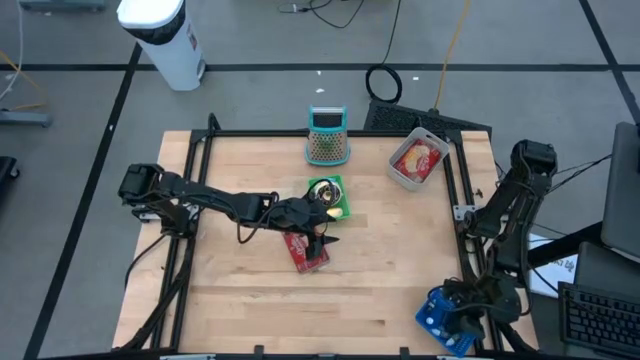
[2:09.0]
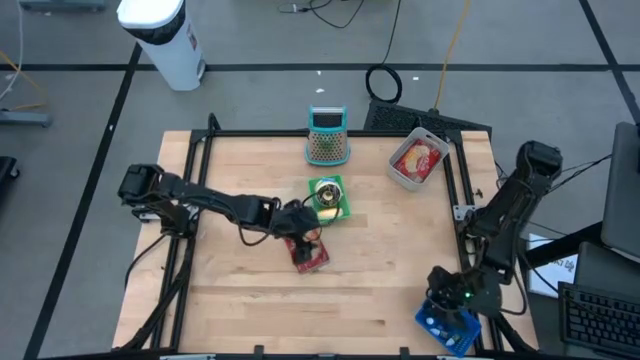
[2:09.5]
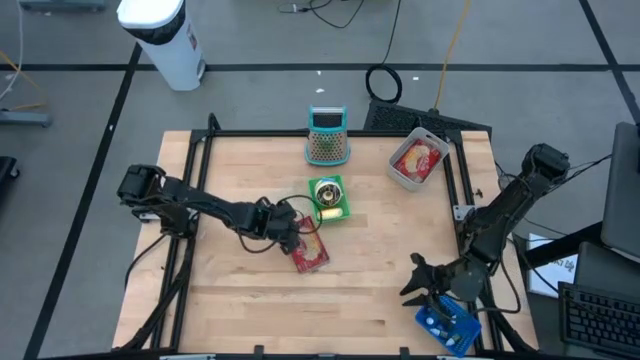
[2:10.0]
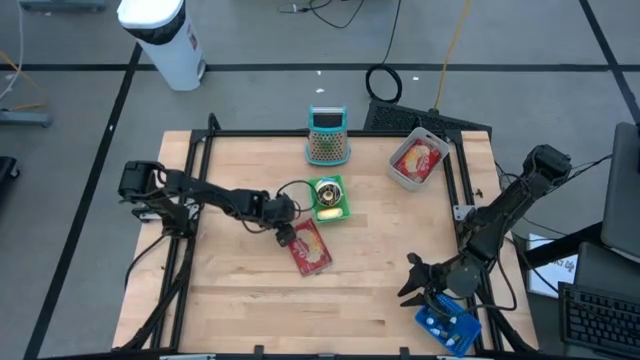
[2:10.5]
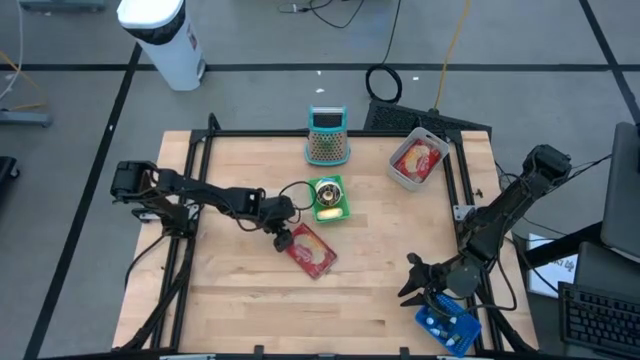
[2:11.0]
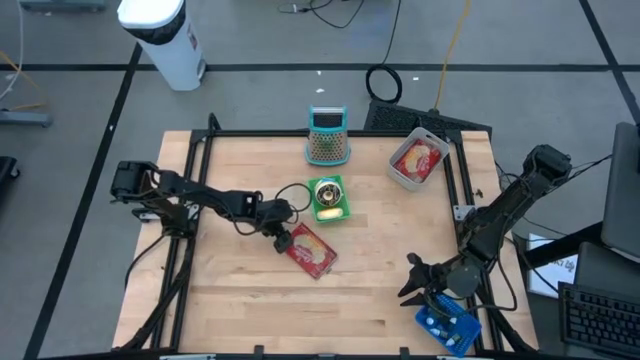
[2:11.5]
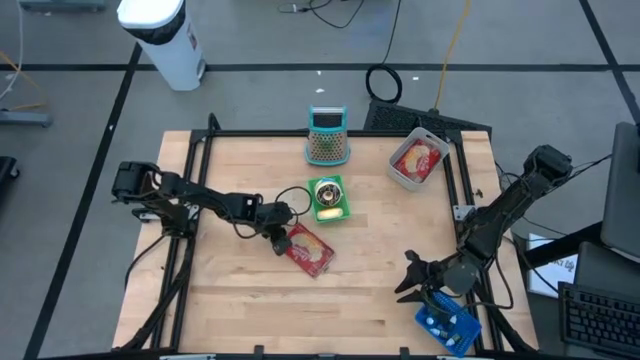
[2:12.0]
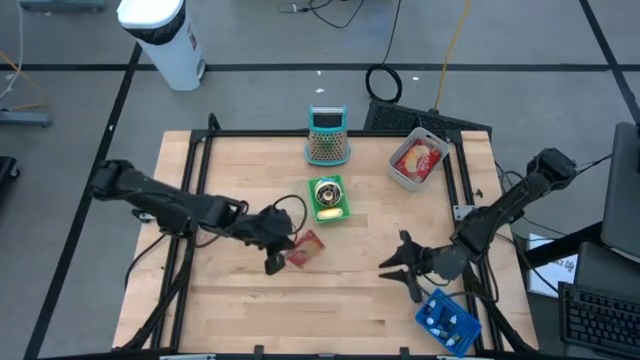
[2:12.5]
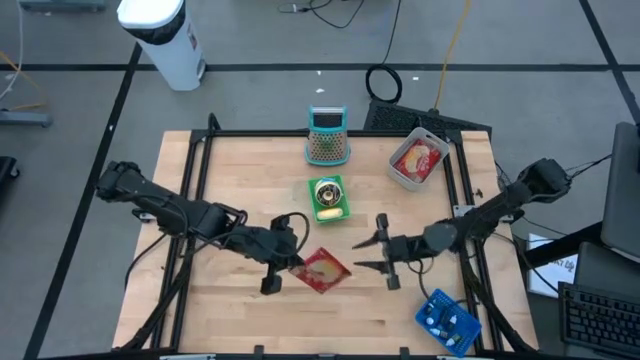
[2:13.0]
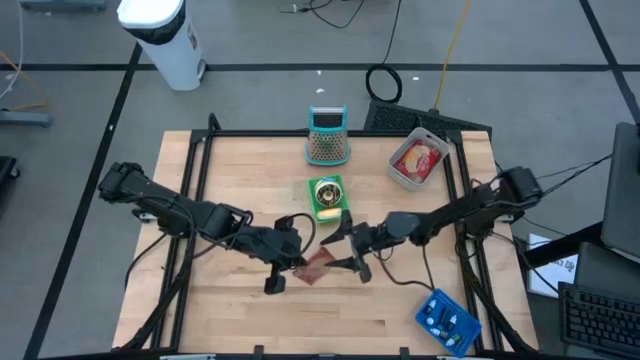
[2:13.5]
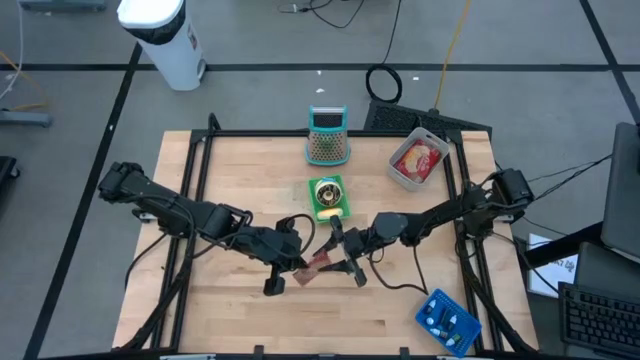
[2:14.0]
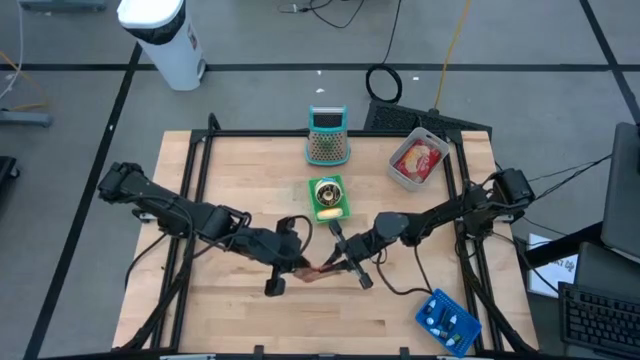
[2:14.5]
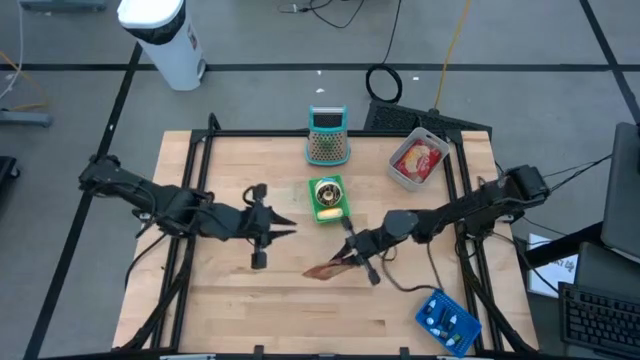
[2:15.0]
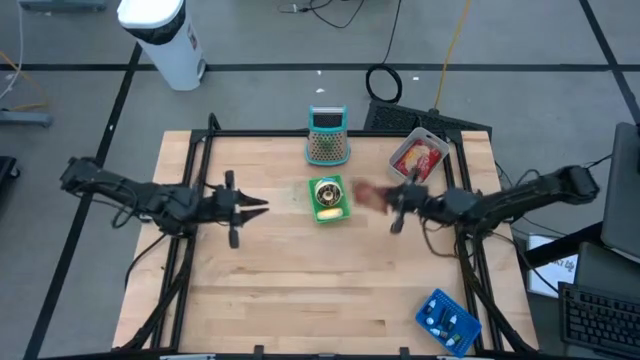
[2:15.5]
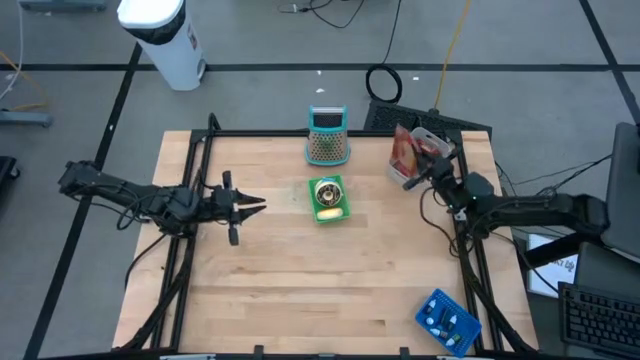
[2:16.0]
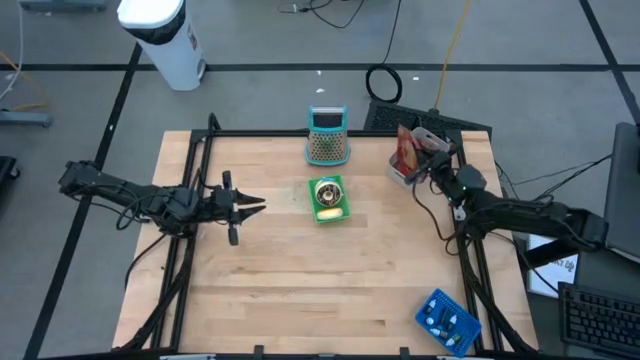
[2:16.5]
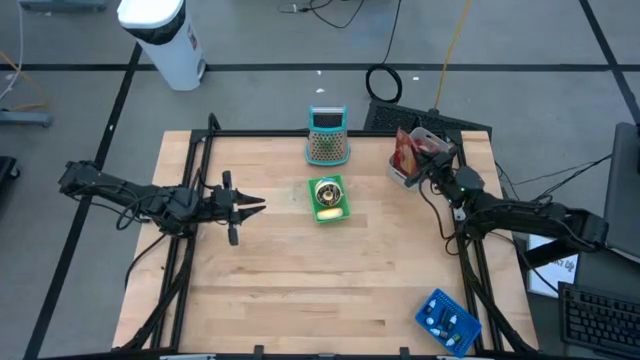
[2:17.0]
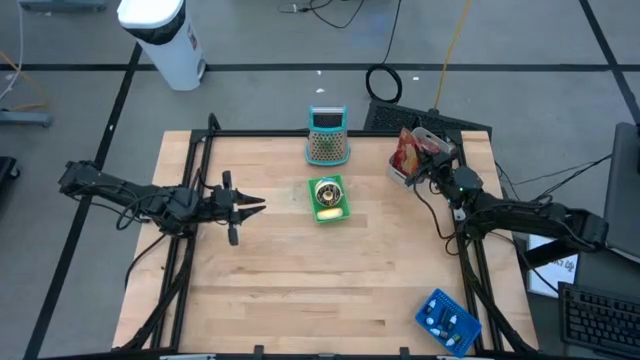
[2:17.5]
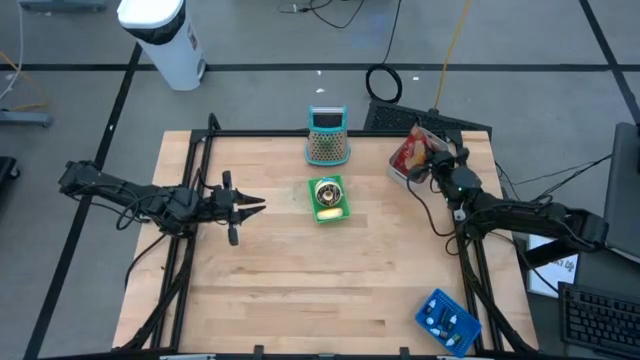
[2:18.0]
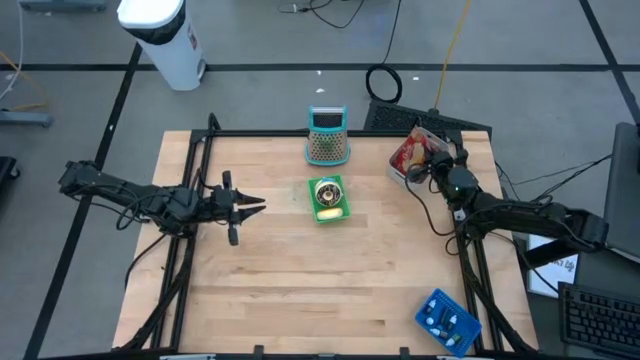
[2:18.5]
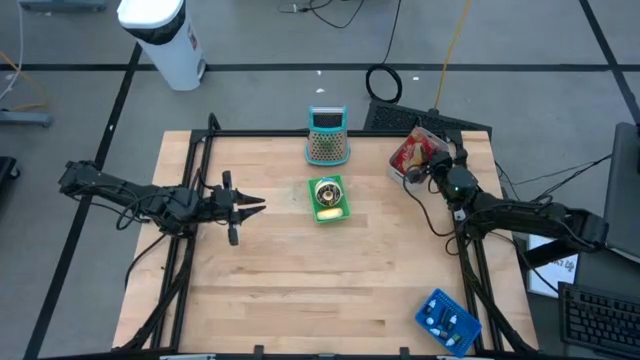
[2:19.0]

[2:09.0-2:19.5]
Put the red popcorn bag into the gray bin

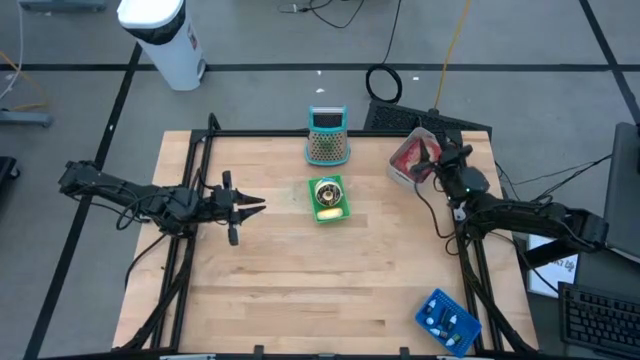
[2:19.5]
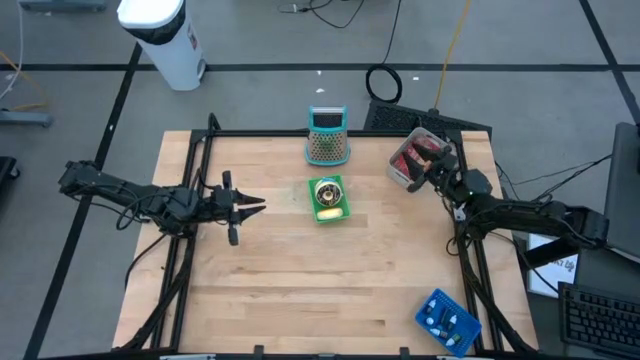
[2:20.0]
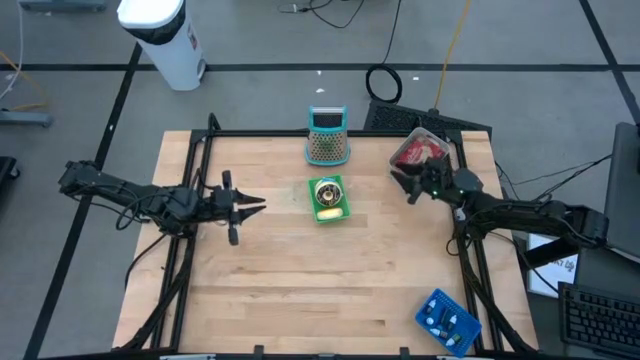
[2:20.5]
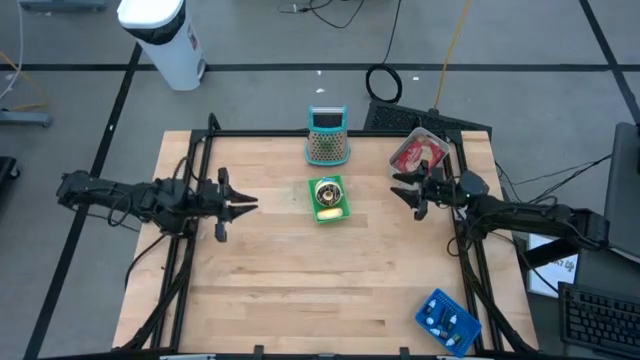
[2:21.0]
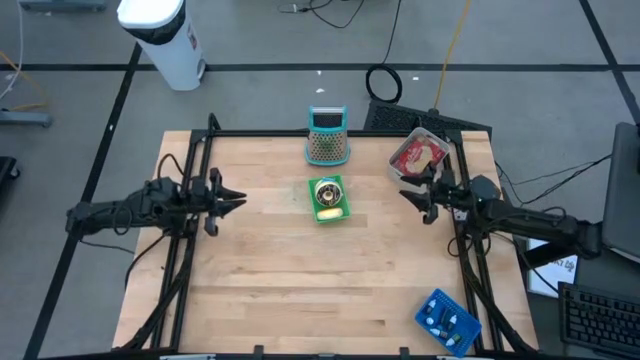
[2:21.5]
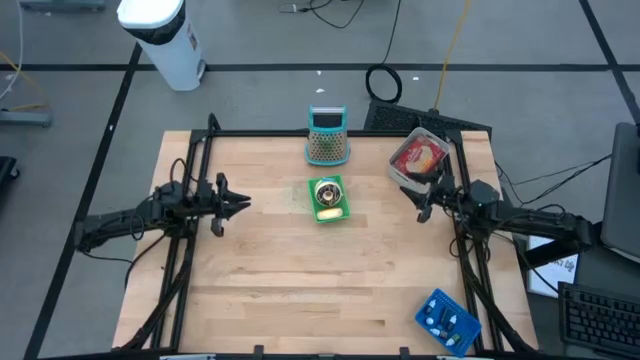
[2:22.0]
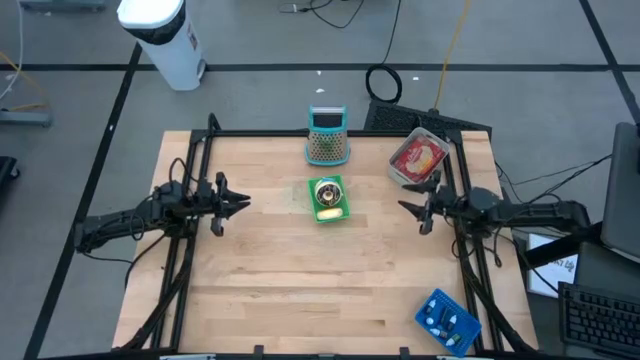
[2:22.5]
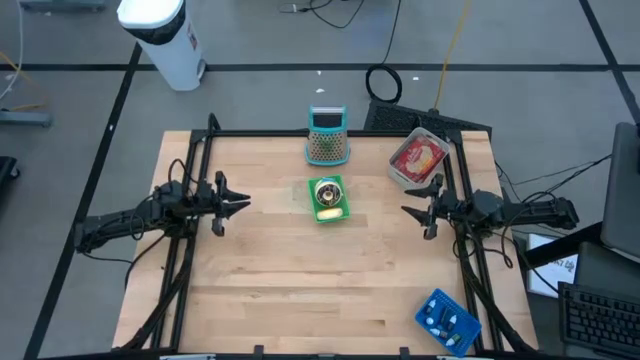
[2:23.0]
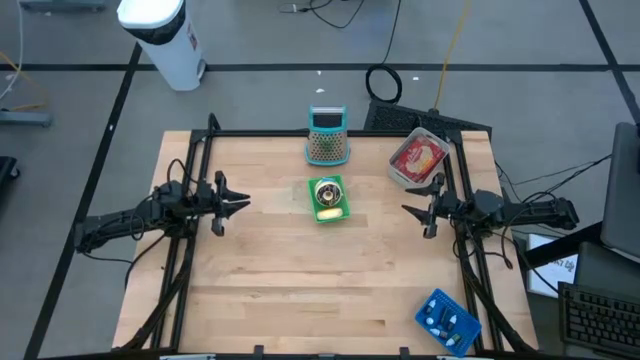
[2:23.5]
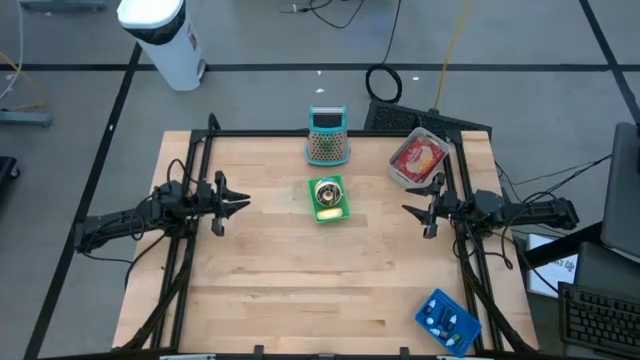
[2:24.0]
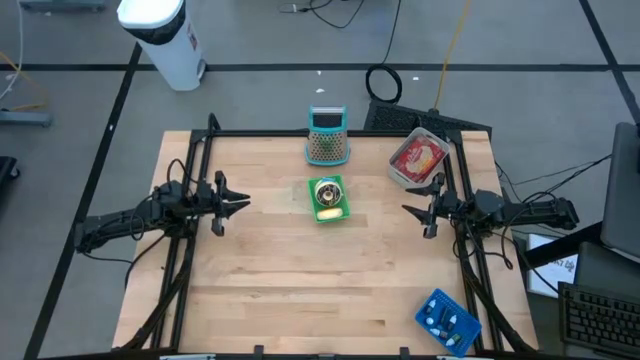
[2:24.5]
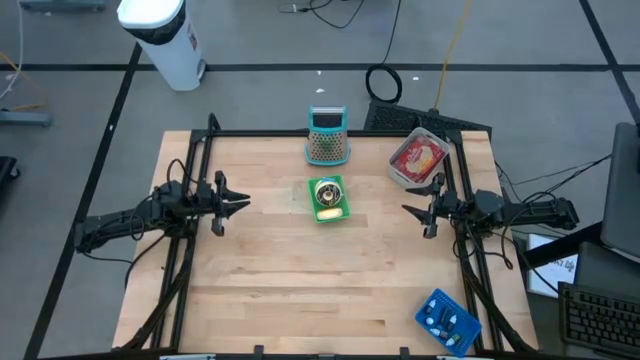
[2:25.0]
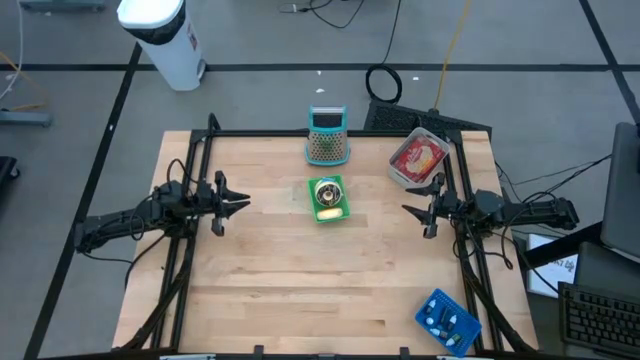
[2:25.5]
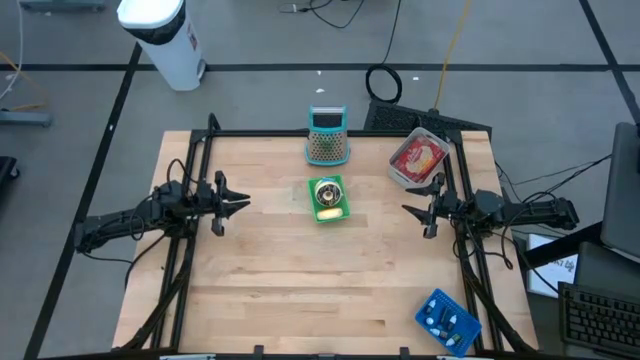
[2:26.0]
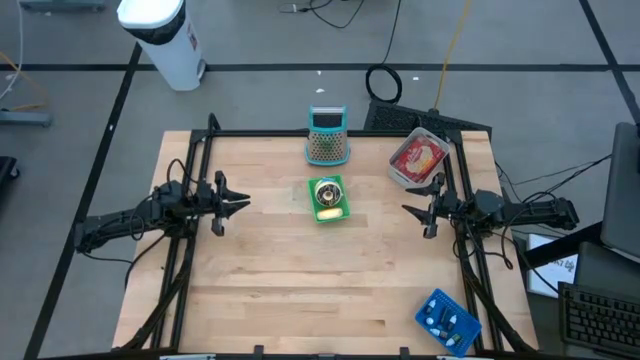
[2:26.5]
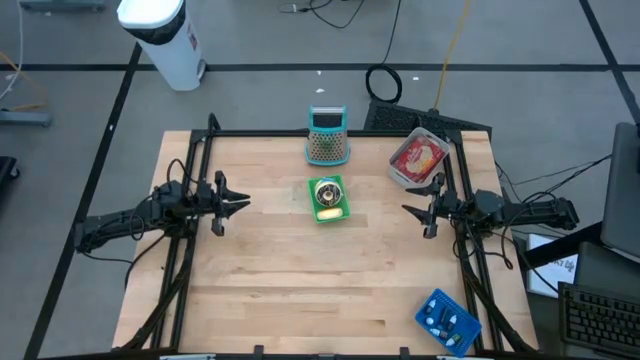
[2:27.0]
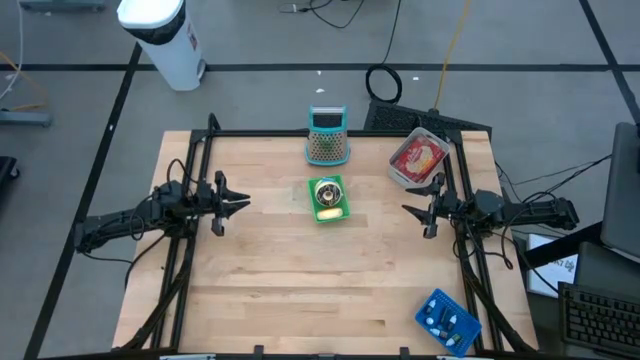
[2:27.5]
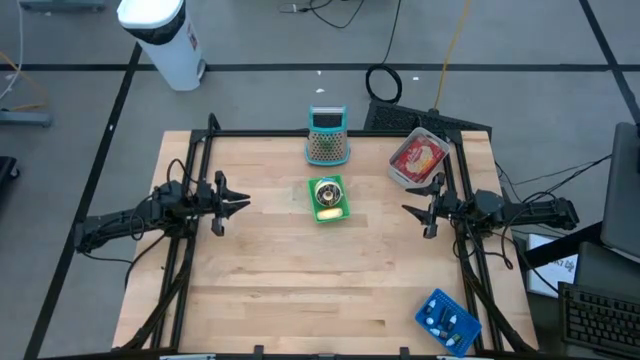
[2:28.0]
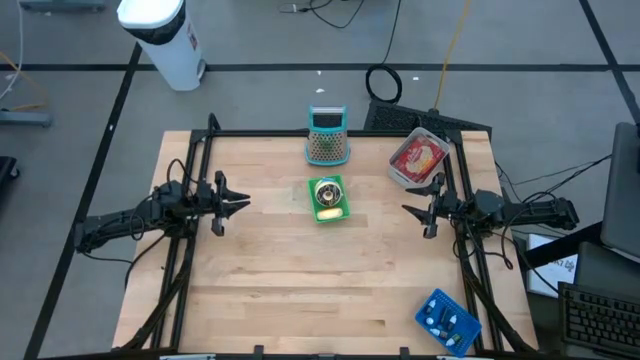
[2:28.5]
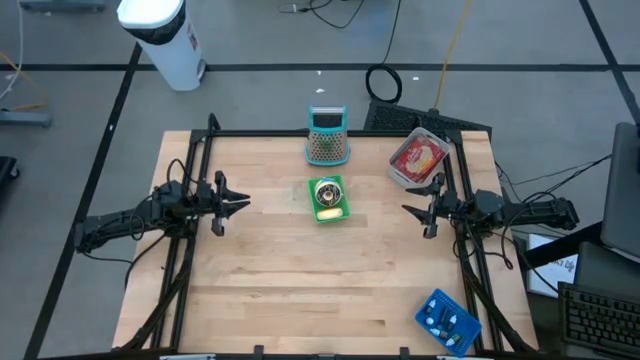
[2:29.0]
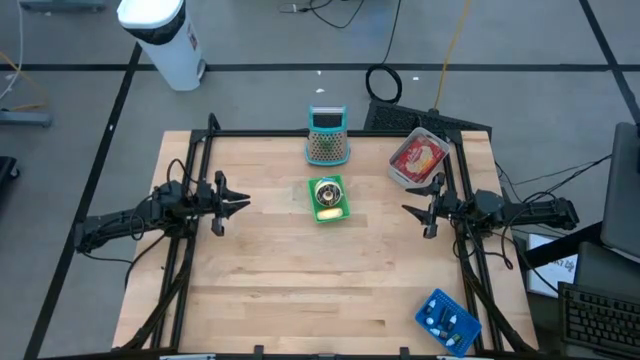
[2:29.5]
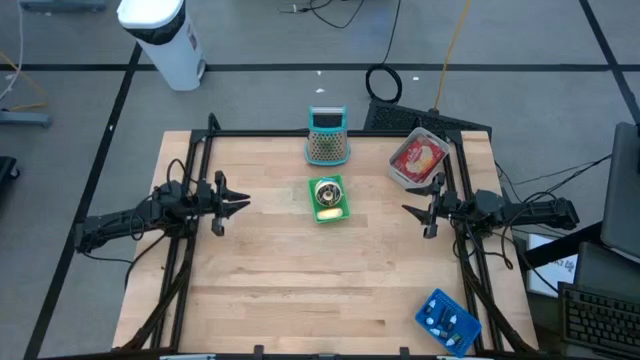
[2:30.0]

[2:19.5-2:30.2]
Return to Home Position
